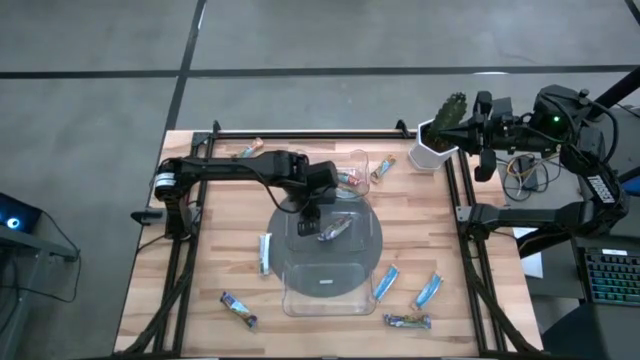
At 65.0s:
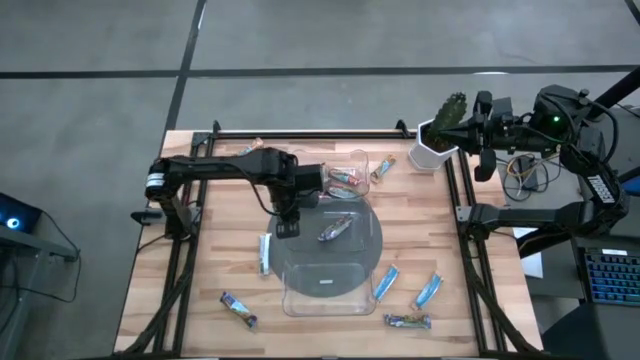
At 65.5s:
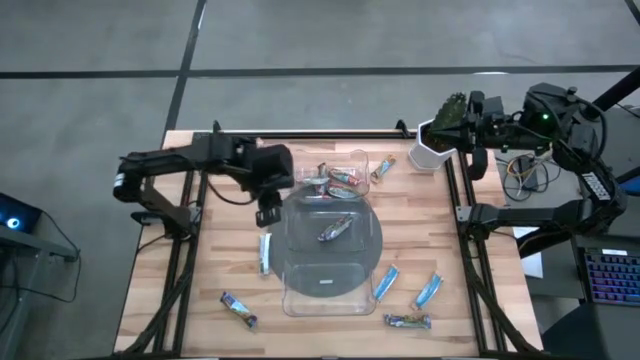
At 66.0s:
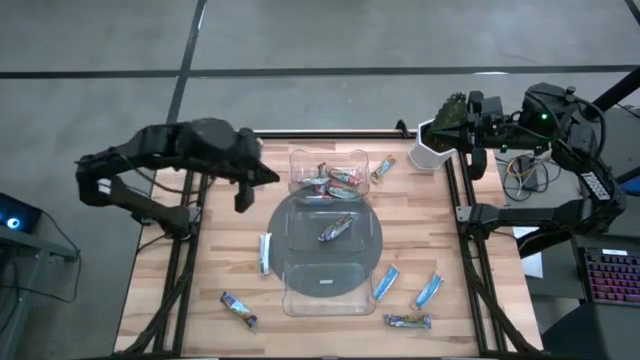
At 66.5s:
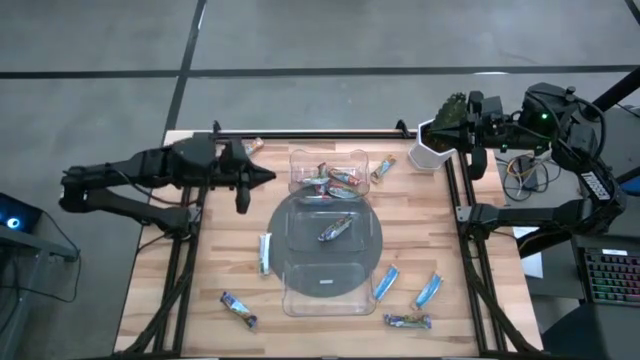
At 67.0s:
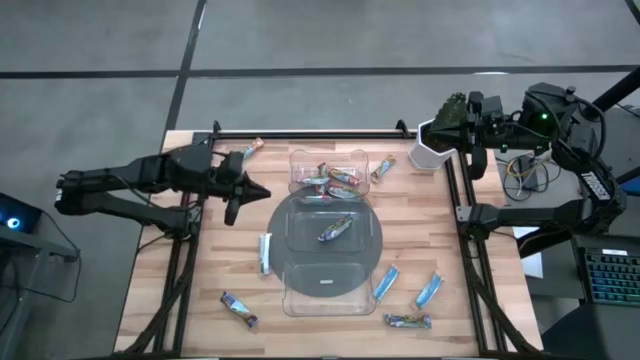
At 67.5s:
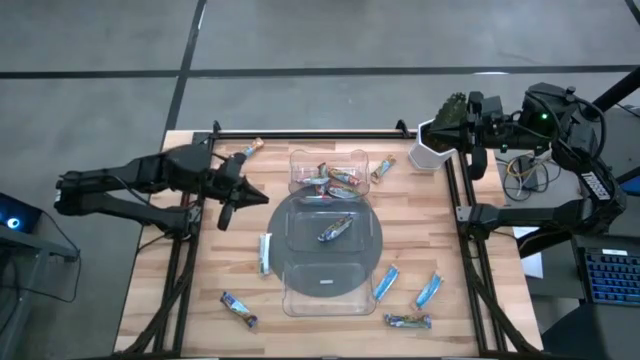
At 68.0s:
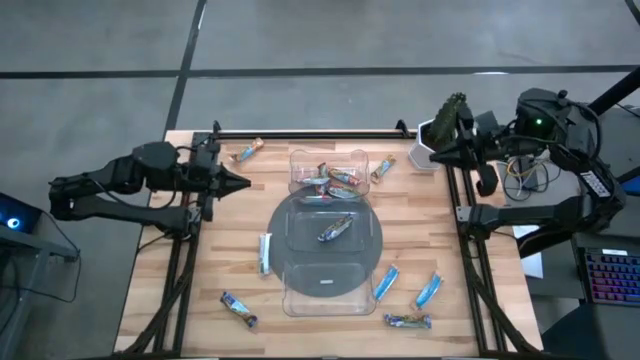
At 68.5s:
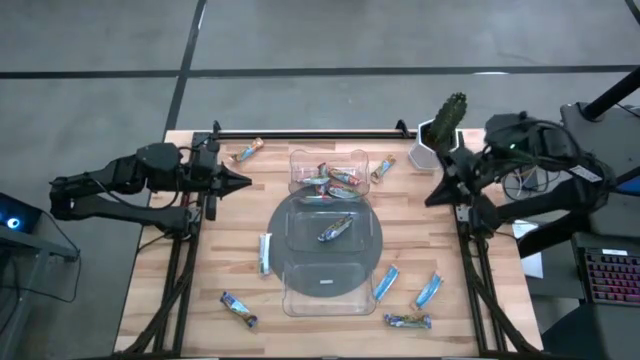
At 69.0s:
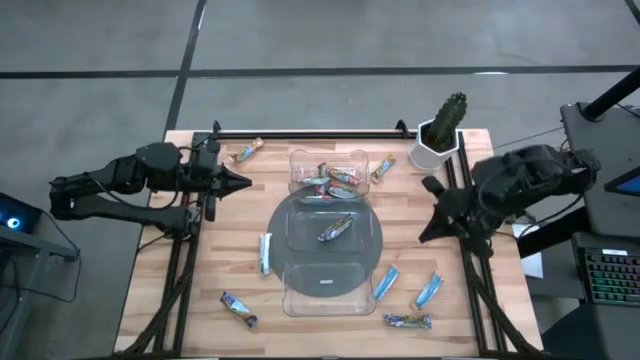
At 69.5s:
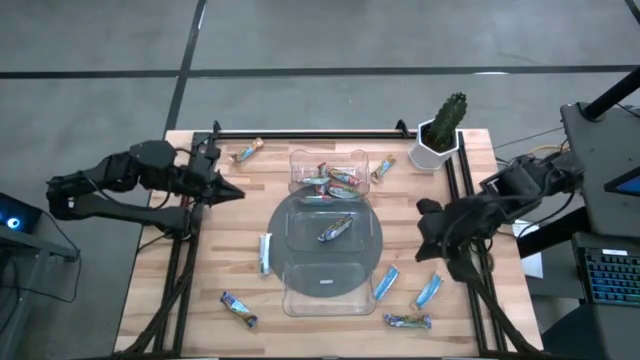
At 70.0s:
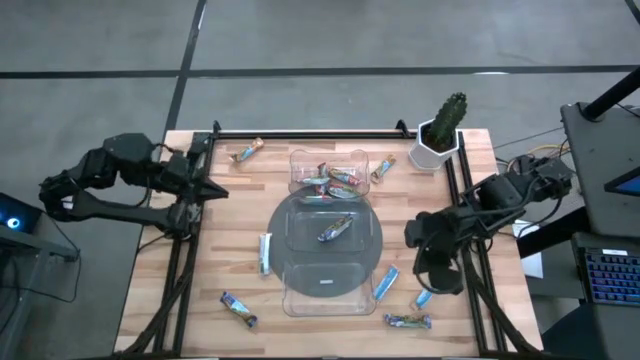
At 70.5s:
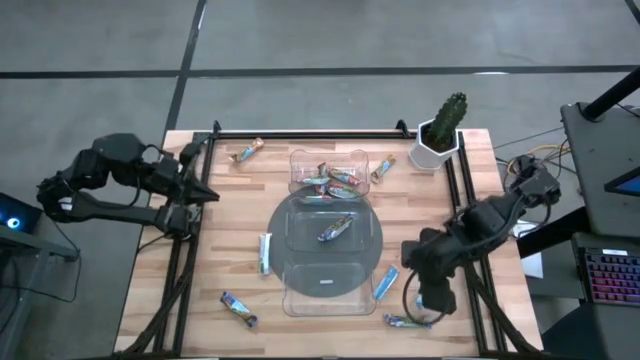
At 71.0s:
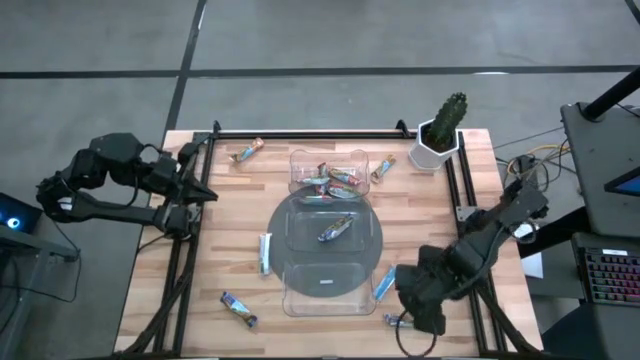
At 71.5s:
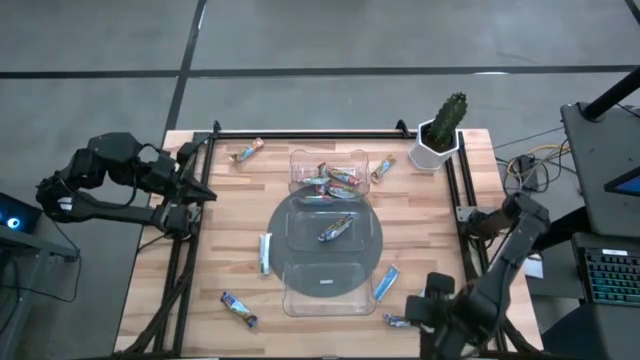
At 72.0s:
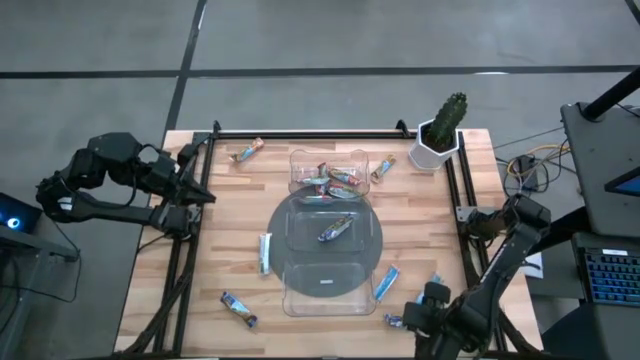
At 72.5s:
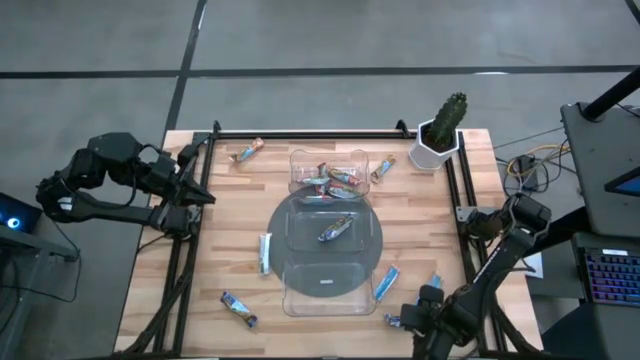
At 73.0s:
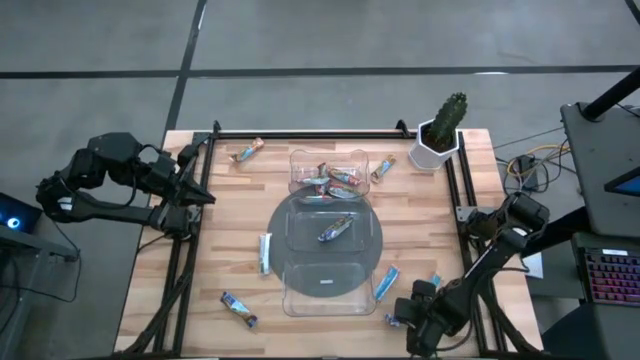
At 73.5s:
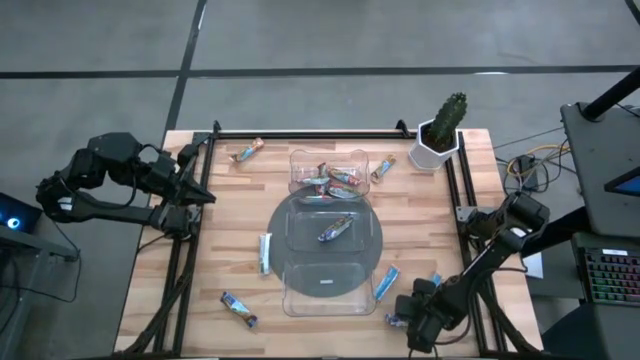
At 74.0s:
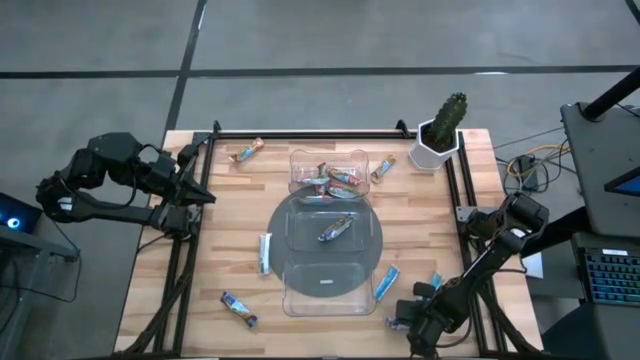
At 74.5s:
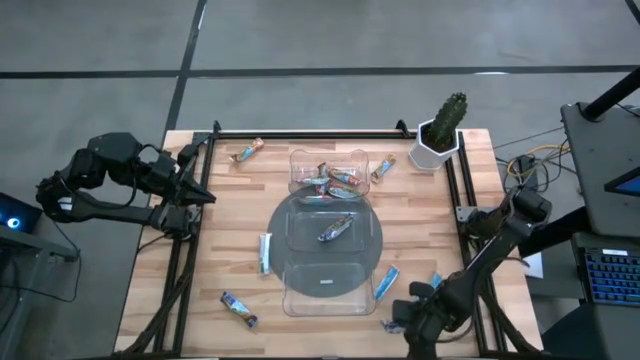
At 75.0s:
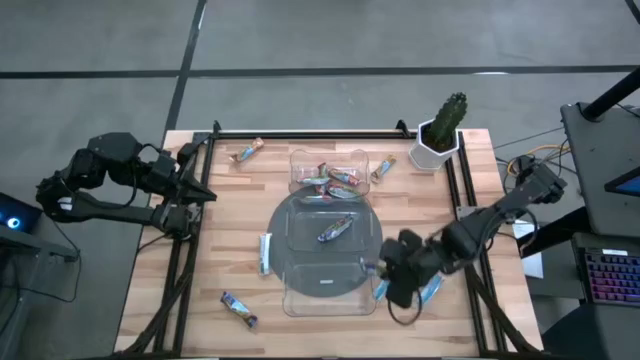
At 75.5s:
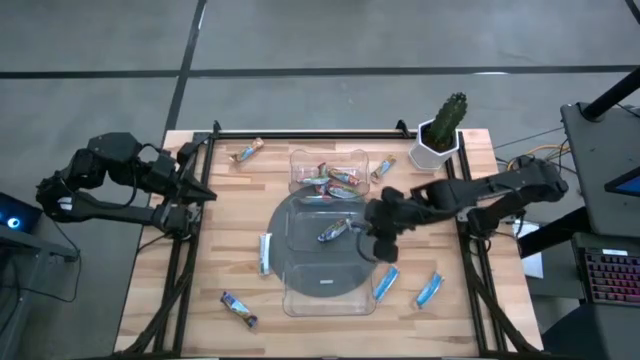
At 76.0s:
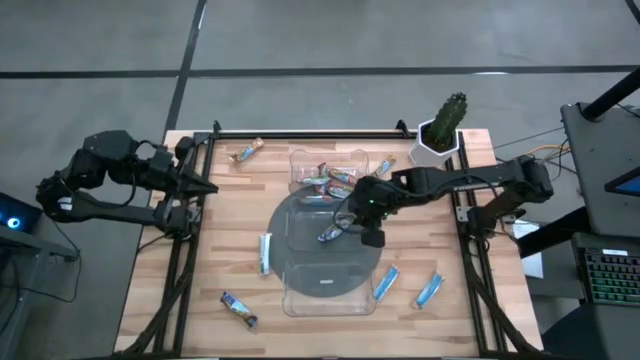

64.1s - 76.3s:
Task: Pick and place Granola Bars by type
Put the blue granola bar into the middle transparent bin

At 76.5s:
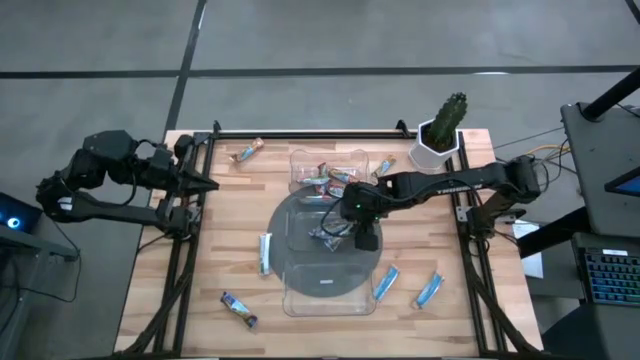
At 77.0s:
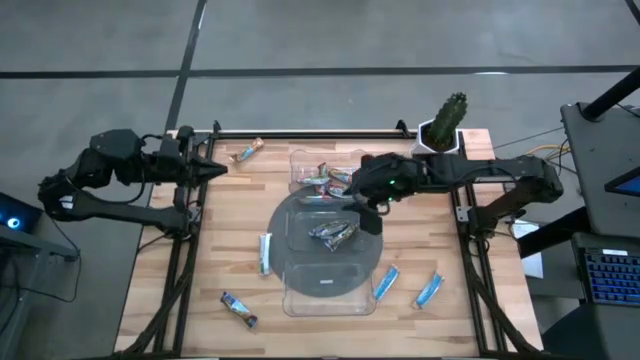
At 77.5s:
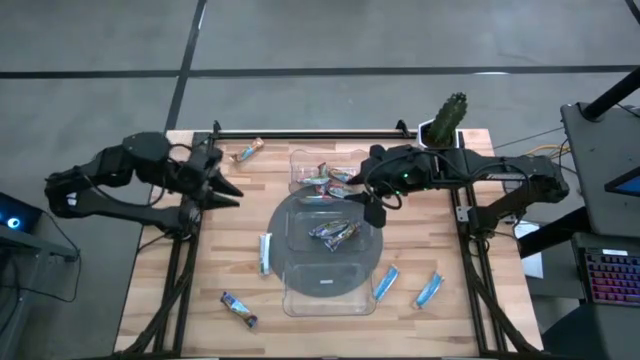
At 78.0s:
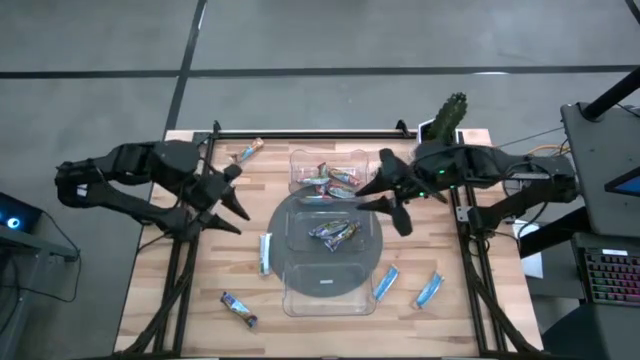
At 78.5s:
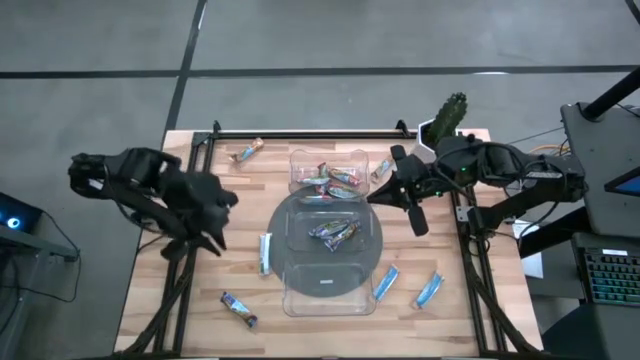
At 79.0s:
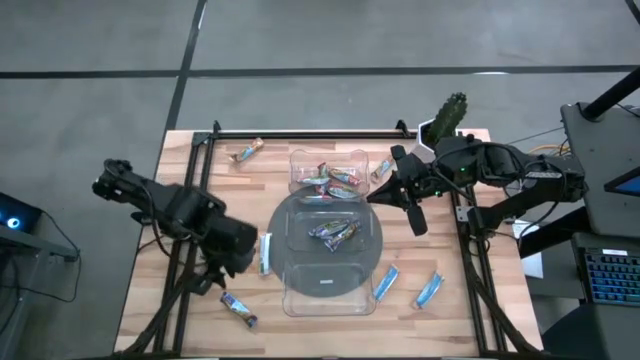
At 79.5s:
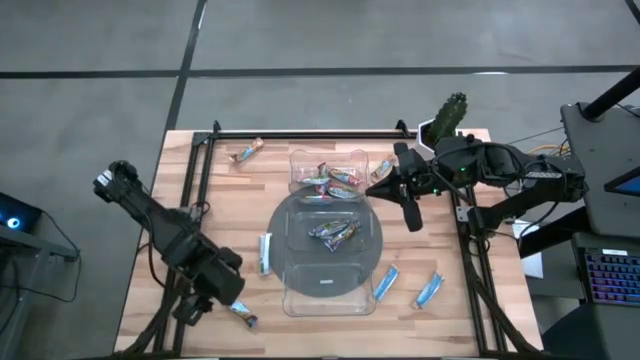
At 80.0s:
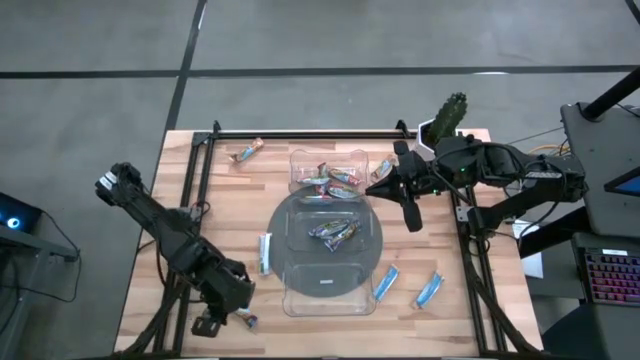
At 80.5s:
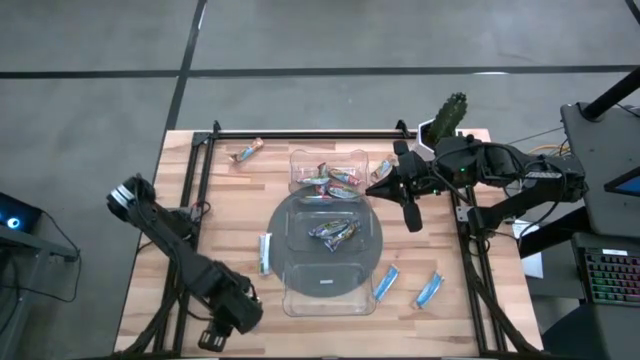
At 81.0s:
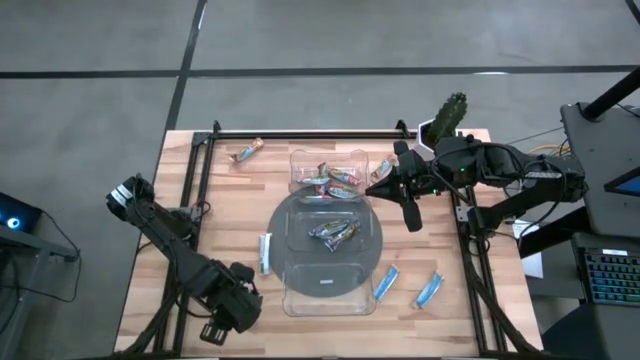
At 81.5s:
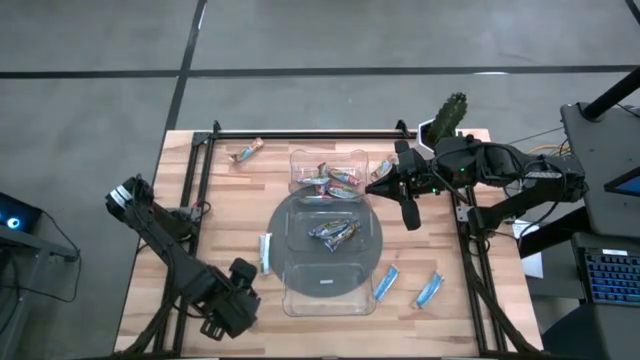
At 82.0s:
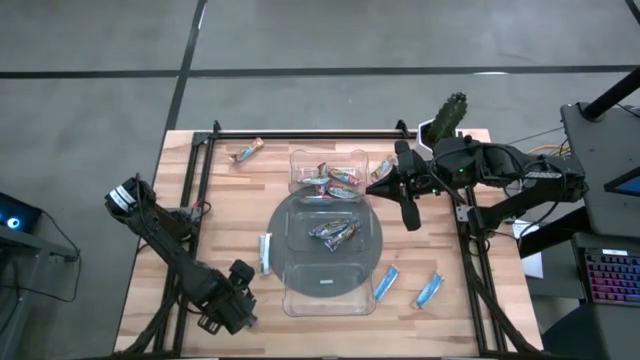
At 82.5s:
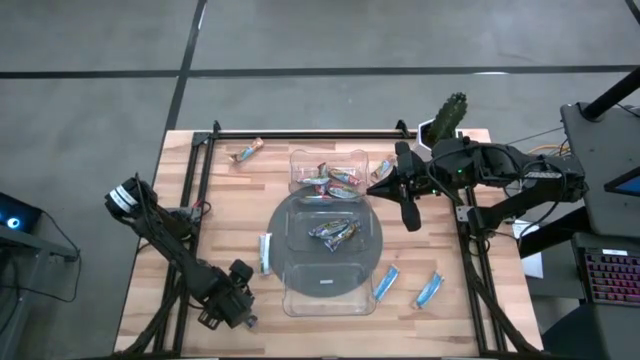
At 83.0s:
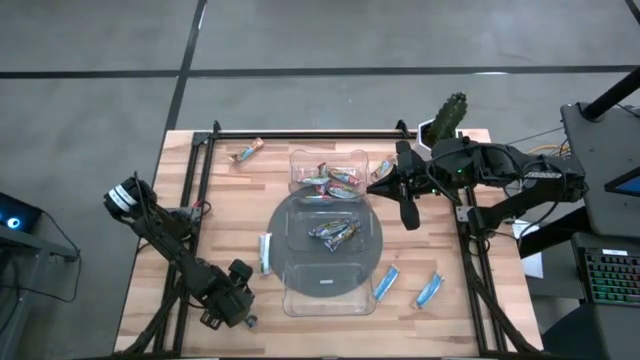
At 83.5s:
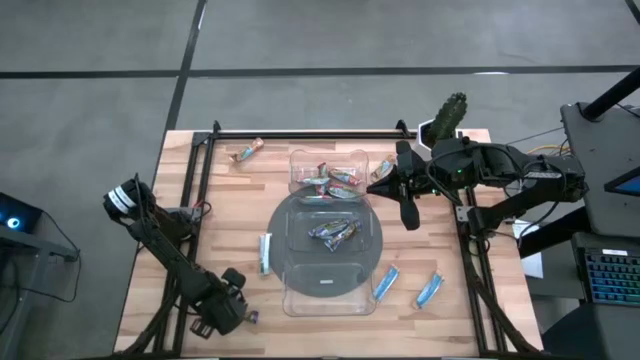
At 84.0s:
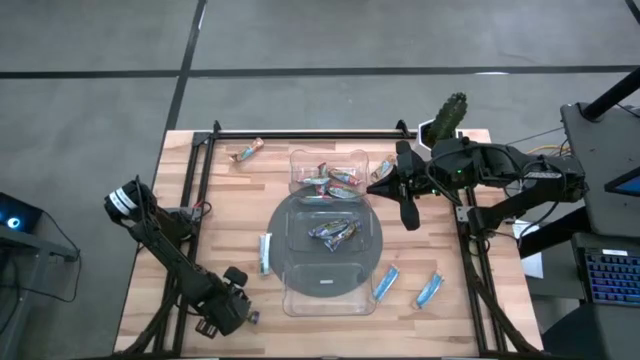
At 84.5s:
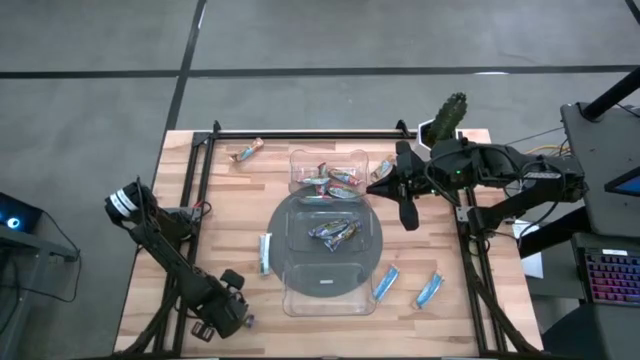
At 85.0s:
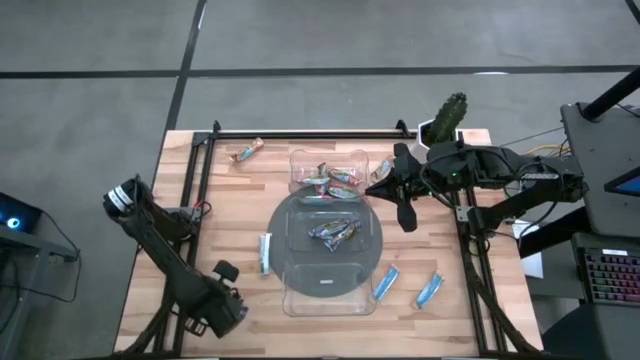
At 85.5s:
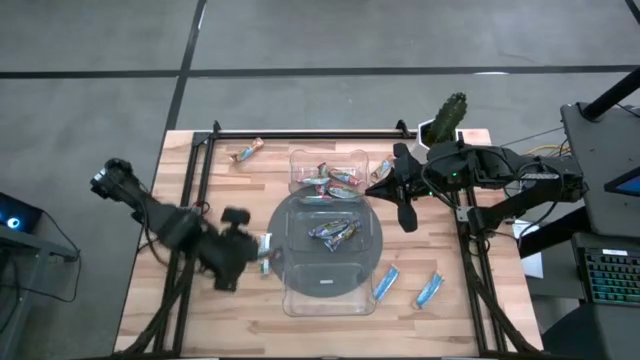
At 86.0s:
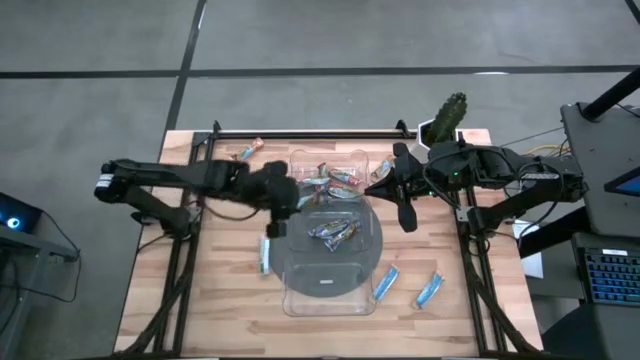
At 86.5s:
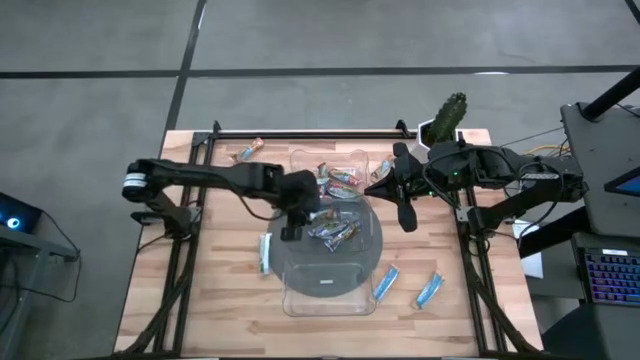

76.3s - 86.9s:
Put the blue granola bar into the middle transparent bin
